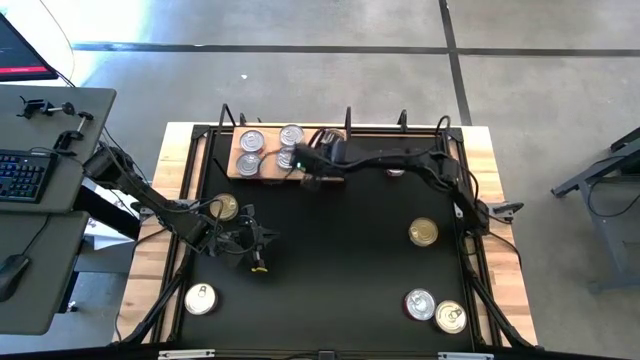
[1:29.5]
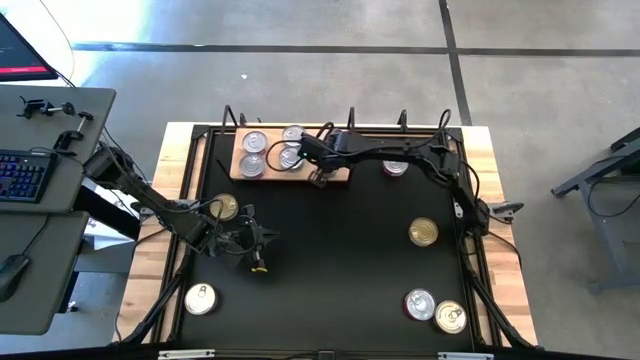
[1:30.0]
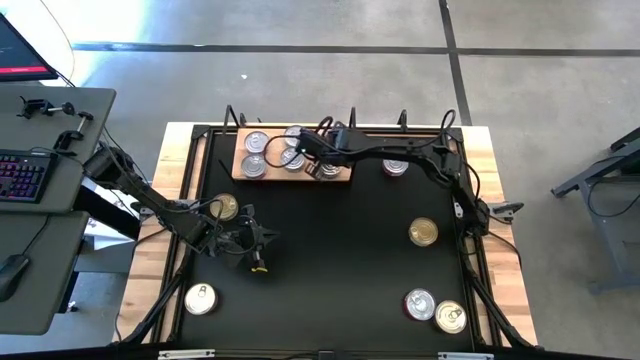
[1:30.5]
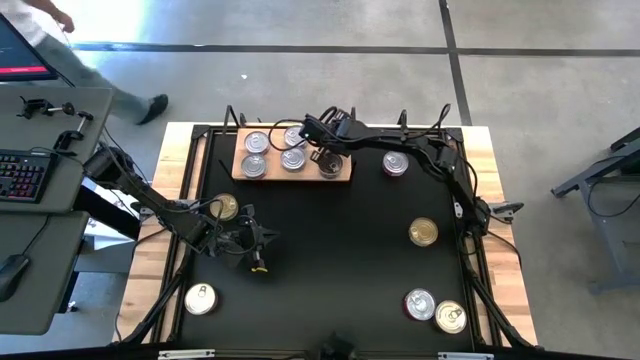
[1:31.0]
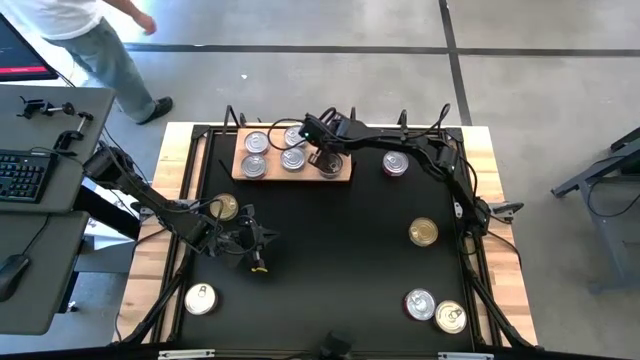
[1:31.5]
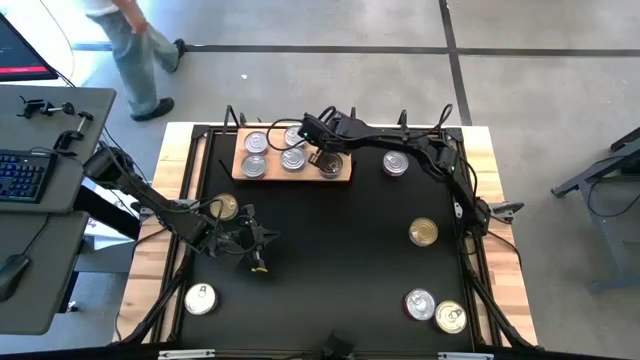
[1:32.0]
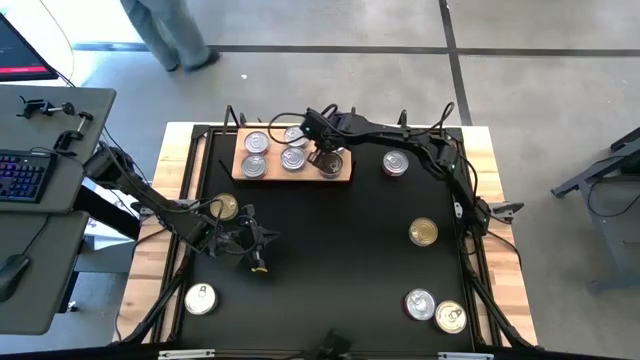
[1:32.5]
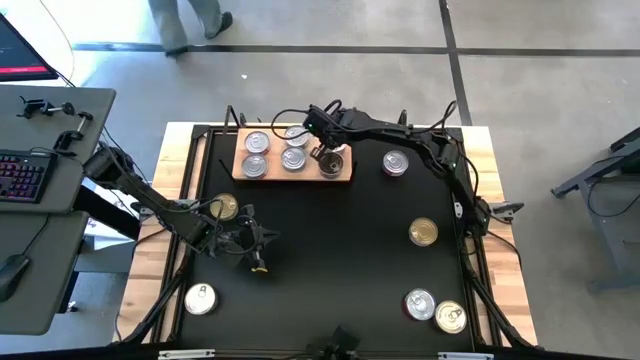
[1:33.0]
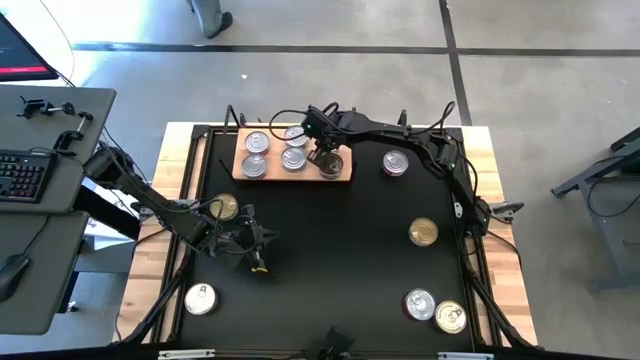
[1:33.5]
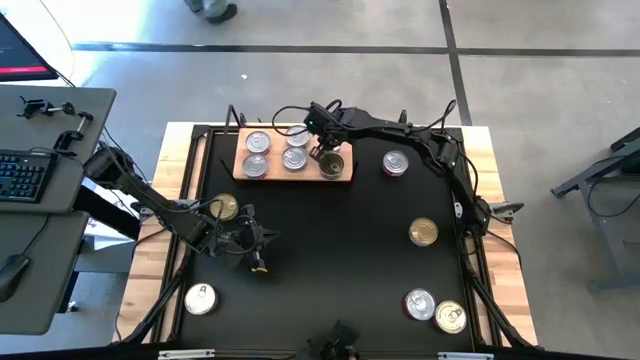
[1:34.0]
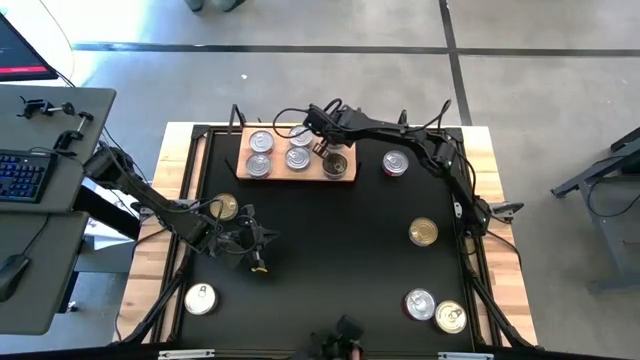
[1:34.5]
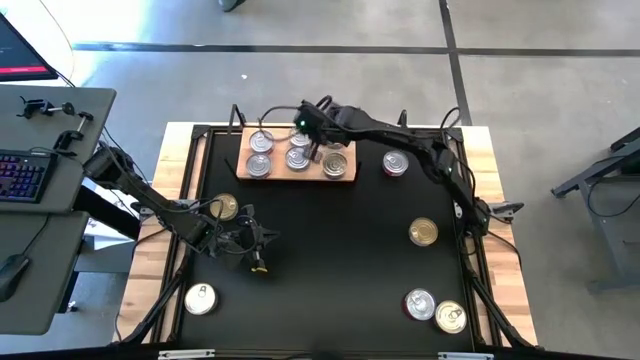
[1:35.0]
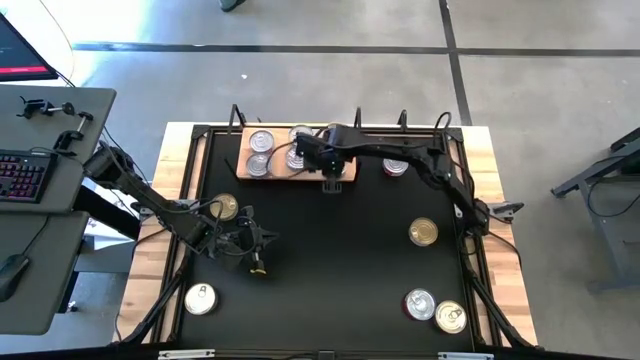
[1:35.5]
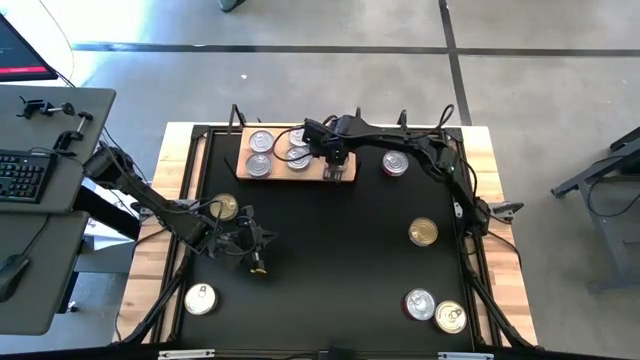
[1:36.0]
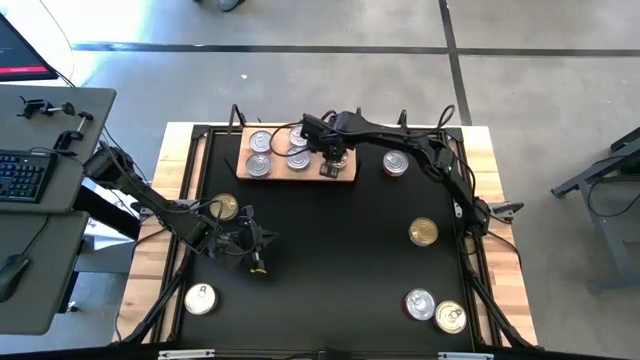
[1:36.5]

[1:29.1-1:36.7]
Task: Stack canned seafood by type on shelf
Adjust the blue pink cans on the shelf

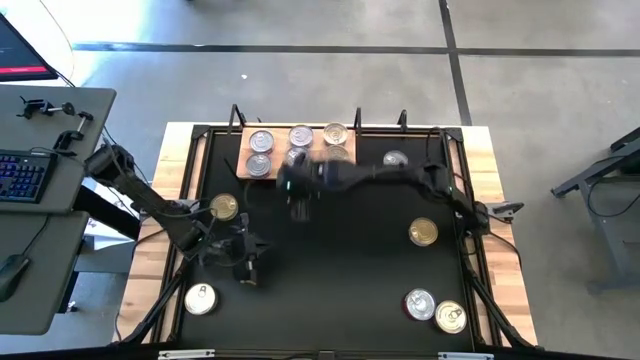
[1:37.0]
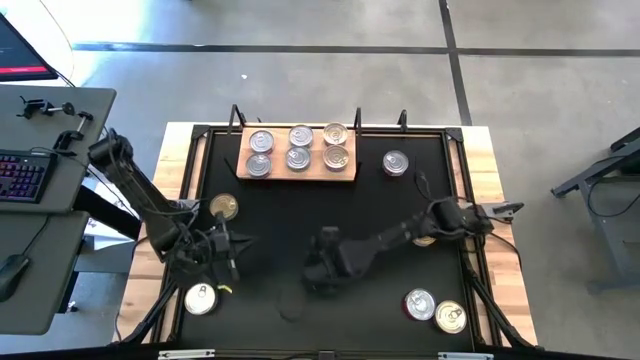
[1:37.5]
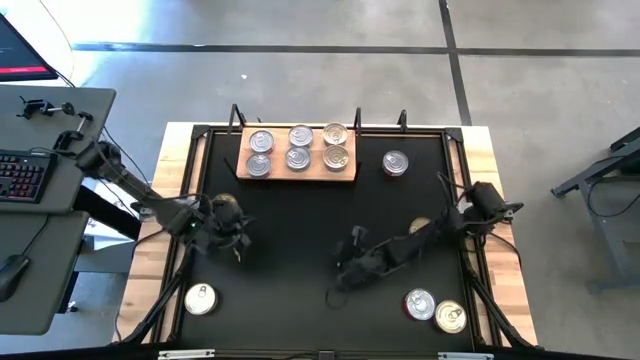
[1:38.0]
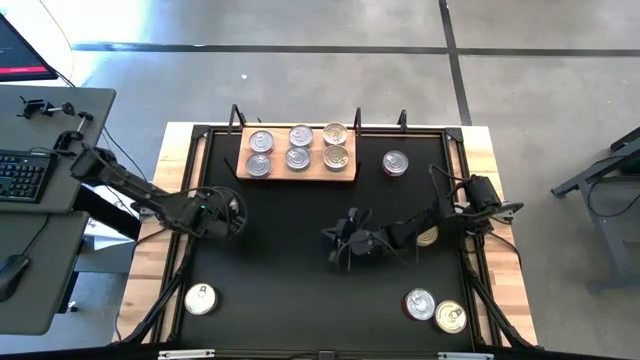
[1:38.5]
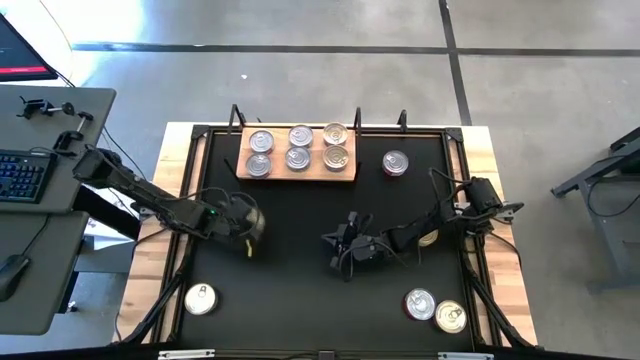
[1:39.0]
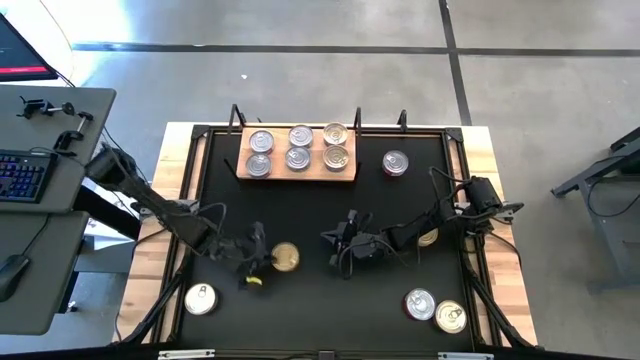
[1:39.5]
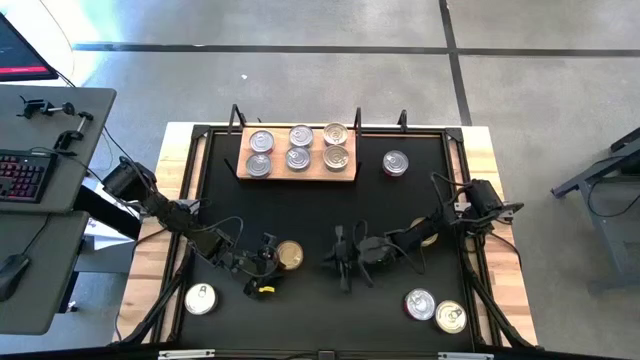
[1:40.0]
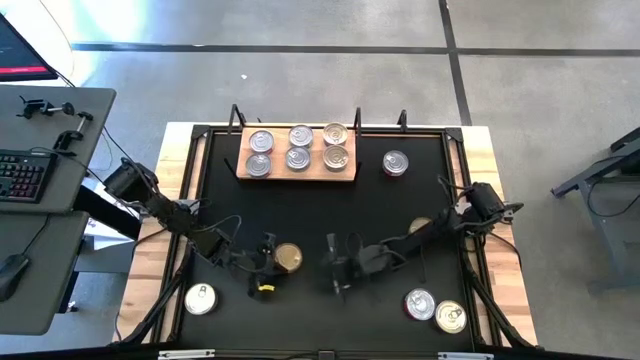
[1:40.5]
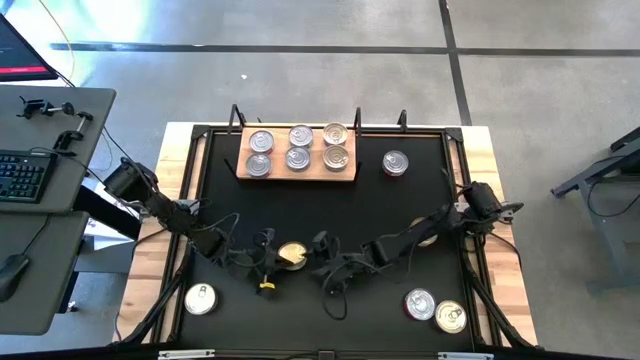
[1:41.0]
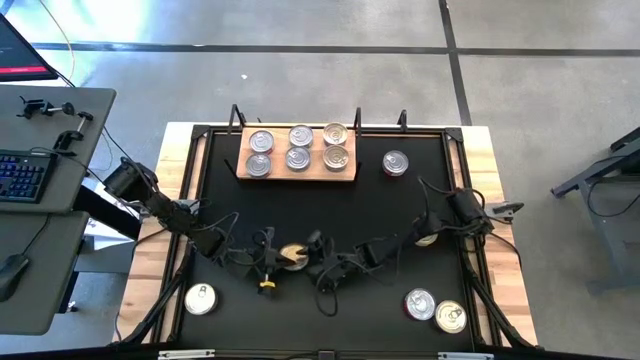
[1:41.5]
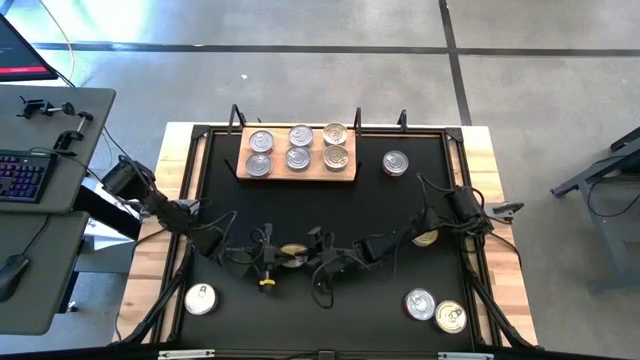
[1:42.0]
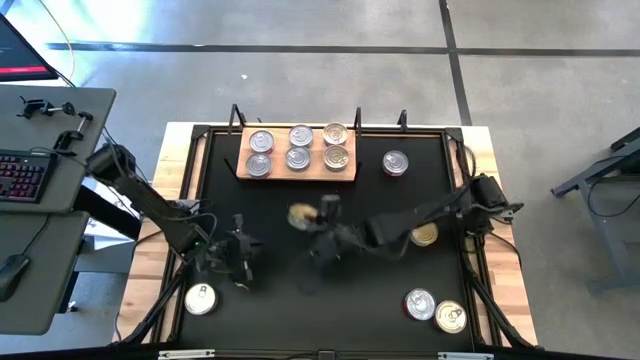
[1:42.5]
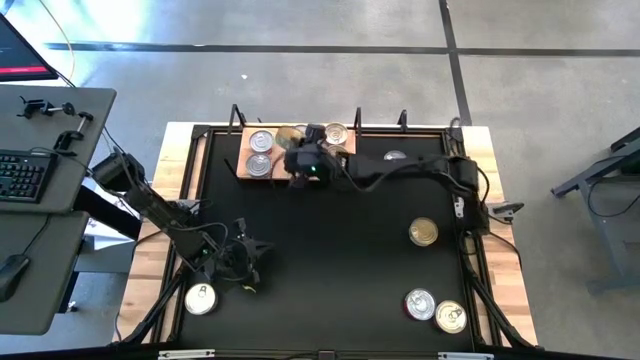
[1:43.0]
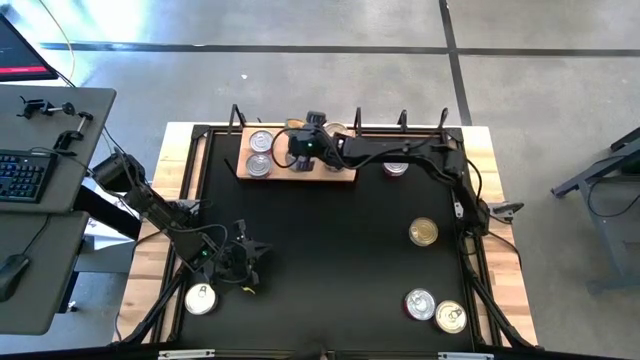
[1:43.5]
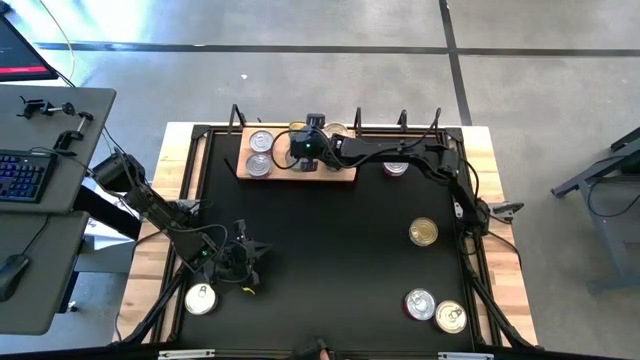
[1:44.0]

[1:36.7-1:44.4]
Stack the green tuna can on top of the green can on the shelf

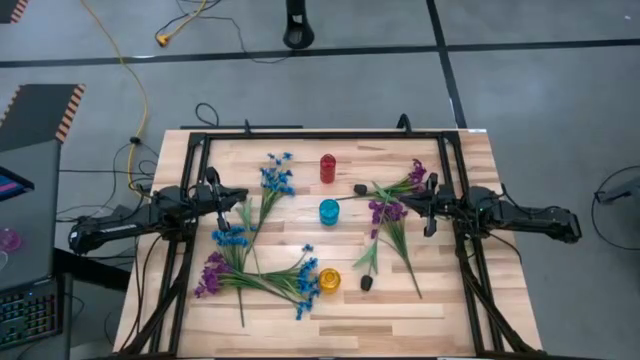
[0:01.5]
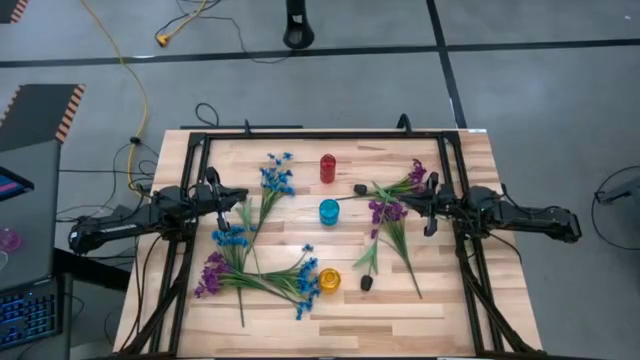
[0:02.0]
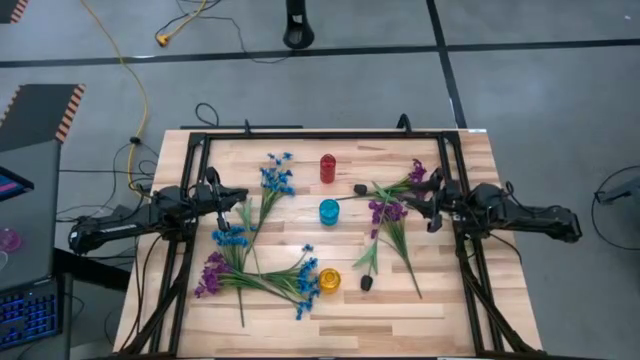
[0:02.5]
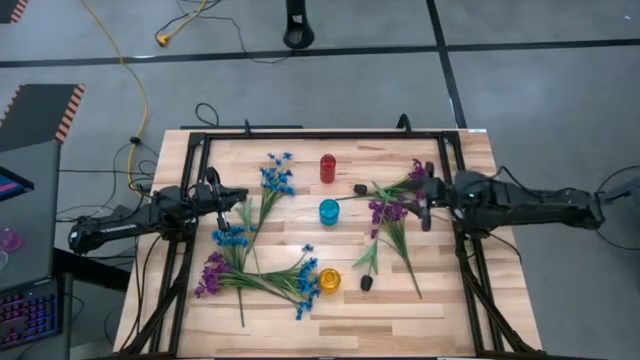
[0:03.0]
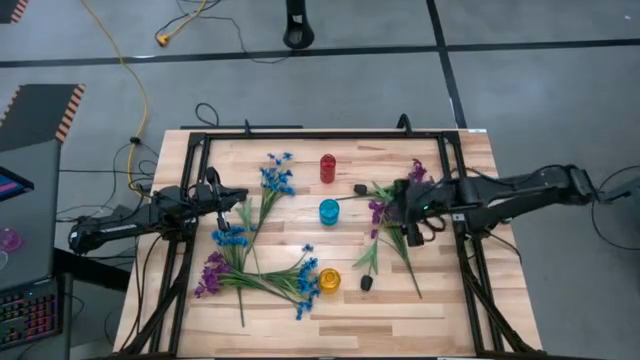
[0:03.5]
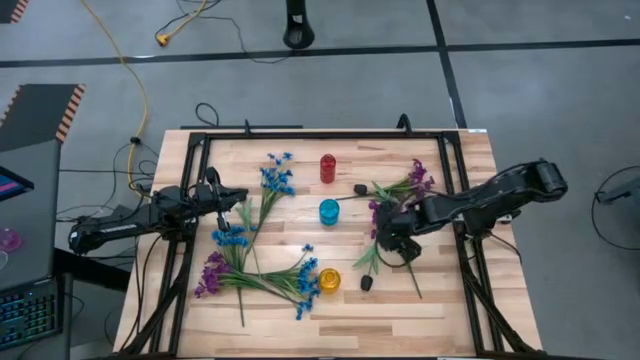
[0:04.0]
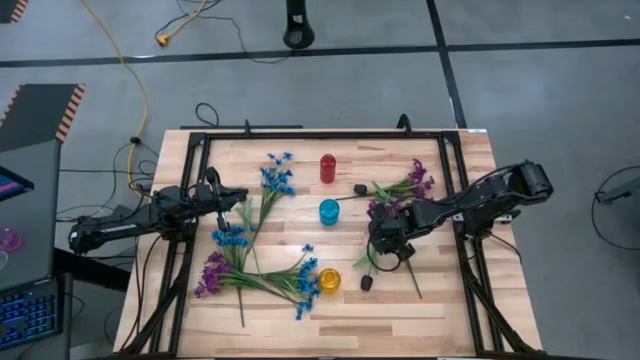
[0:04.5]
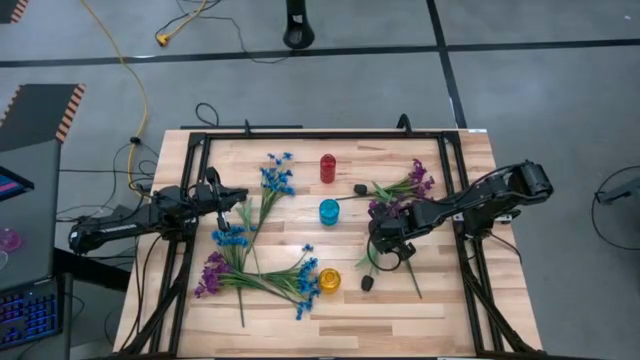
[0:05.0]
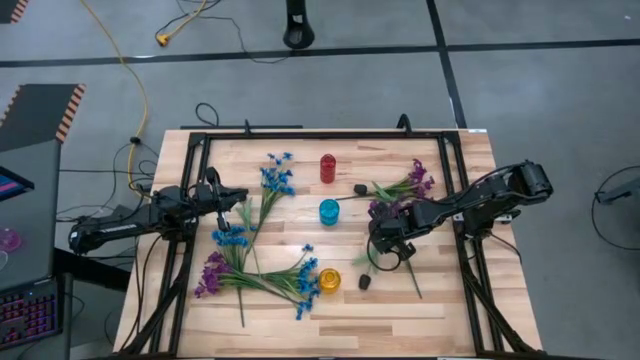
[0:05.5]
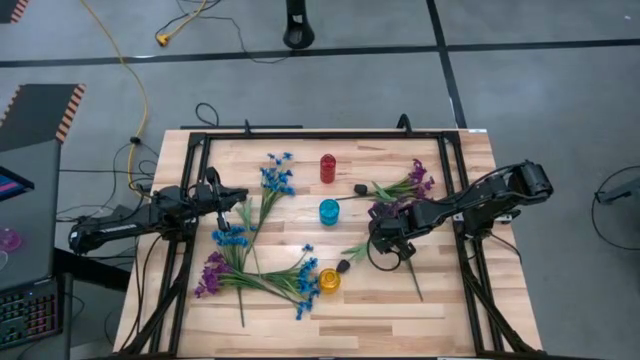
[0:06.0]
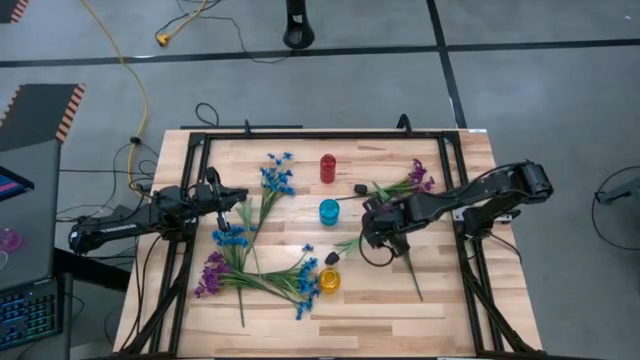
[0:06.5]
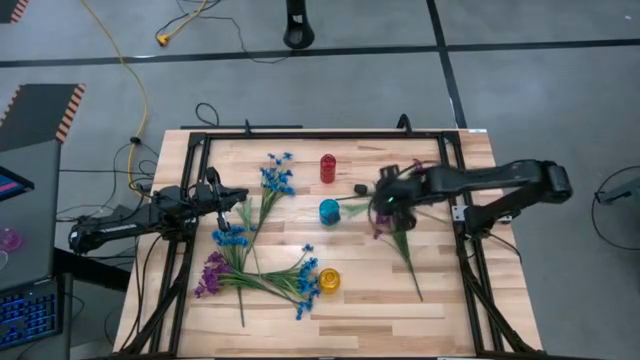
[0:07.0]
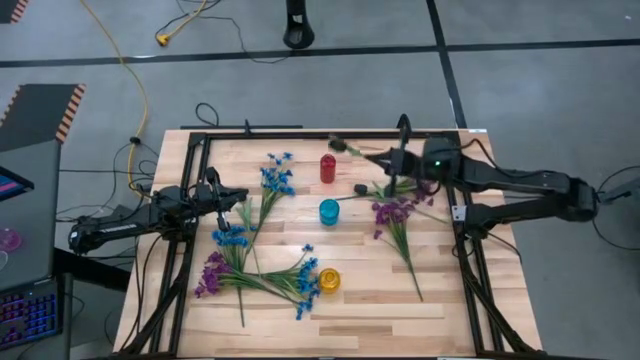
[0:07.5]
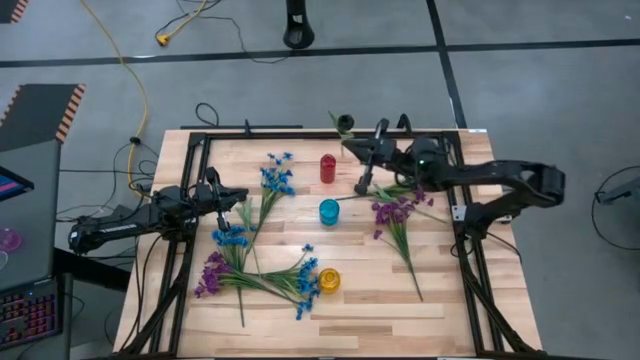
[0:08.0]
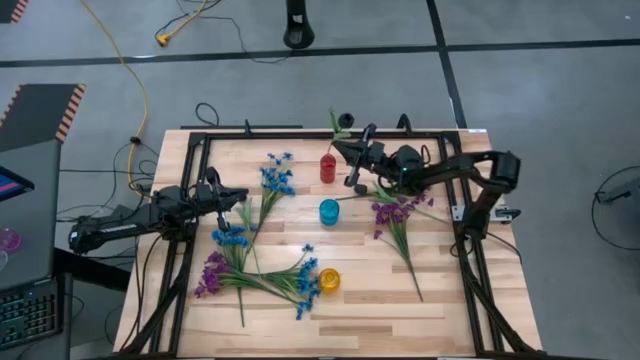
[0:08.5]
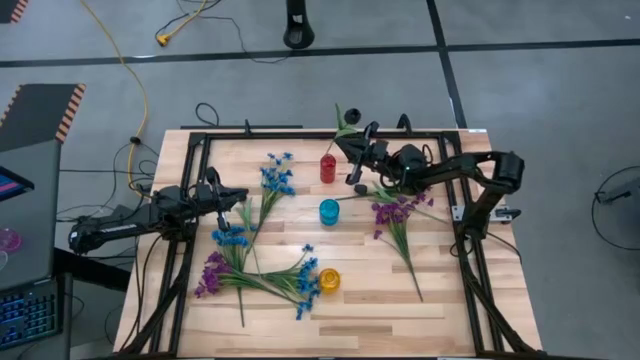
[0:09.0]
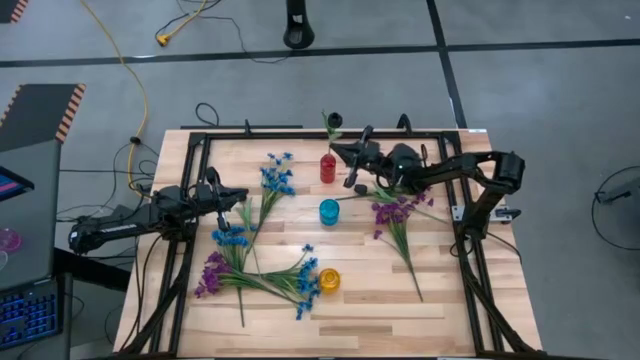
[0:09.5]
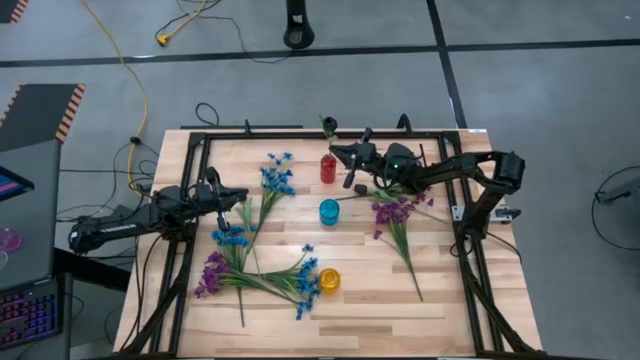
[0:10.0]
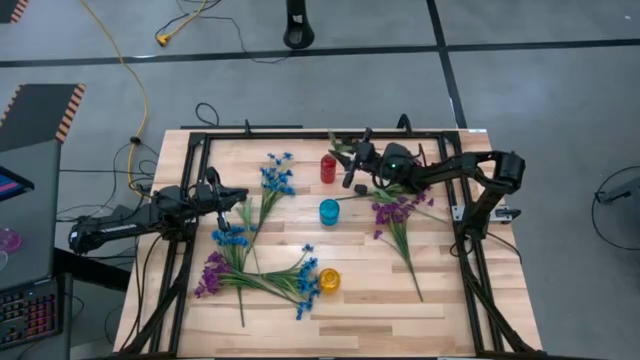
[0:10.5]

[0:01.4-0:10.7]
Task: Sort flowers into vase by color
Put the bottom right black flower into the red crystal vase
